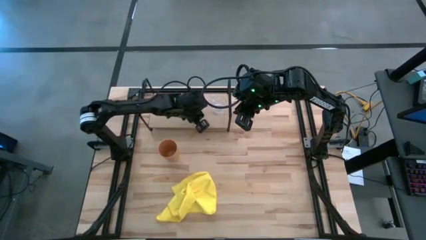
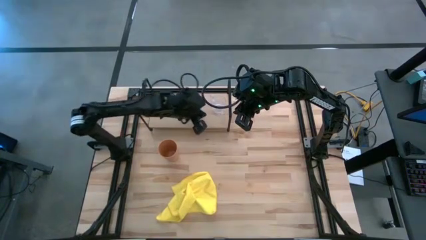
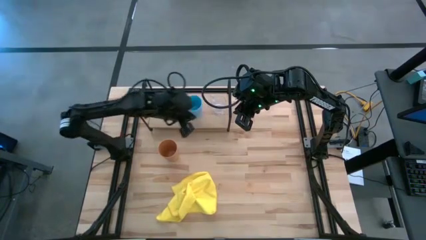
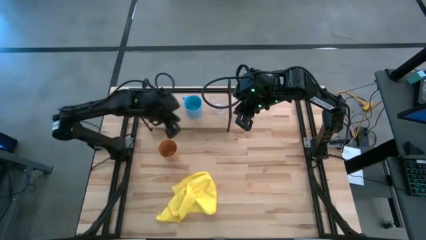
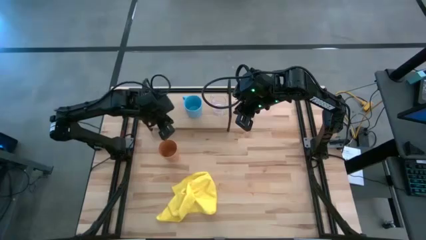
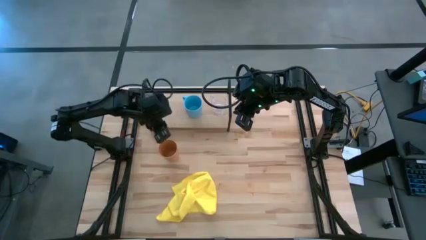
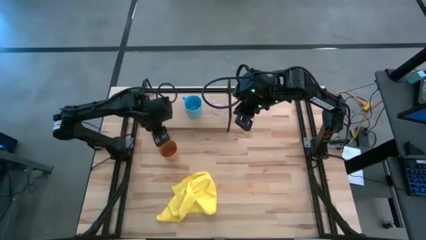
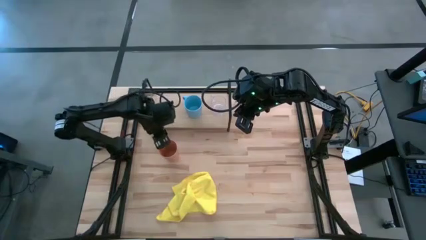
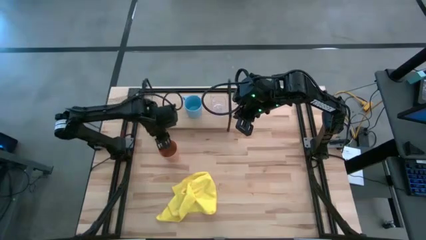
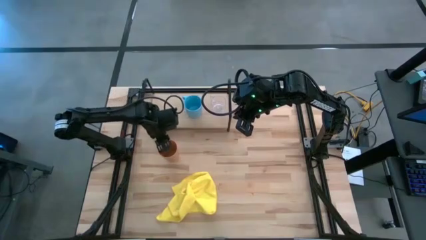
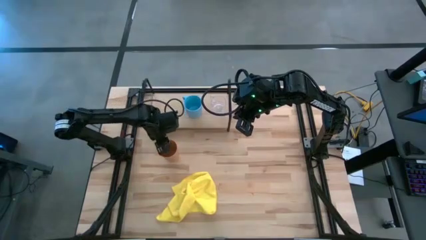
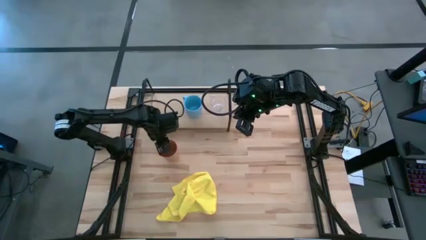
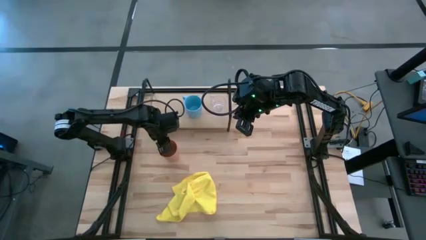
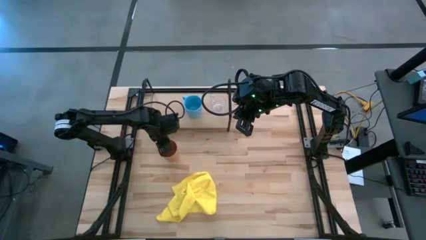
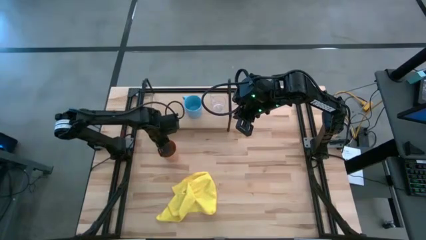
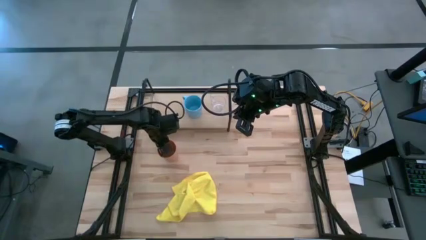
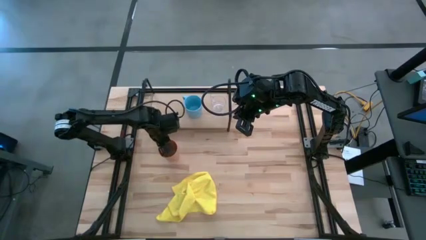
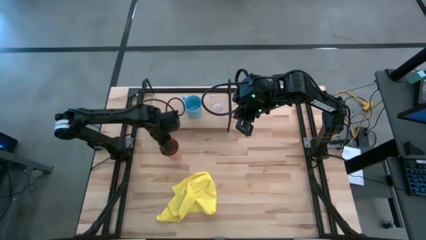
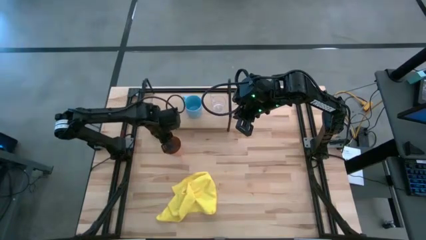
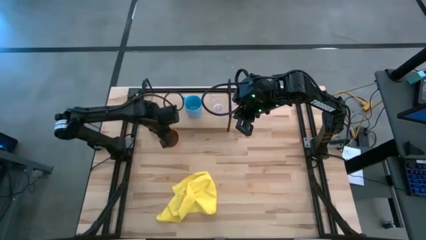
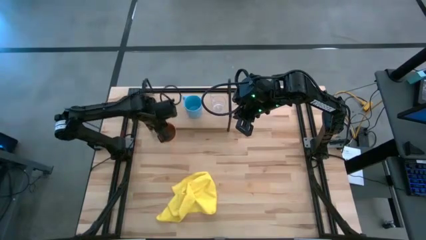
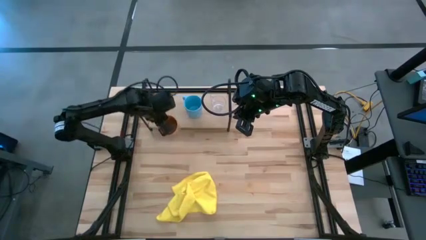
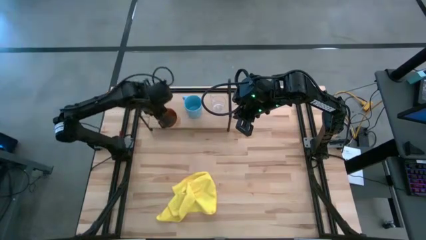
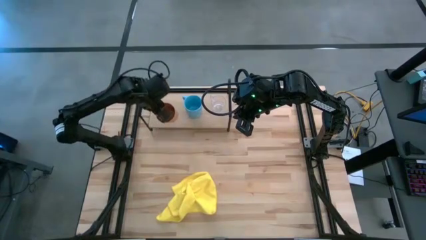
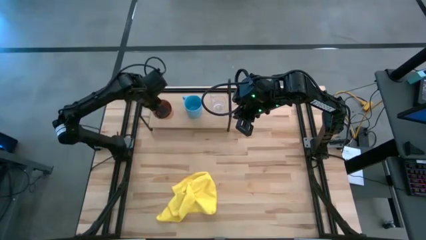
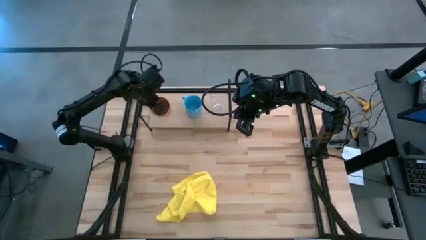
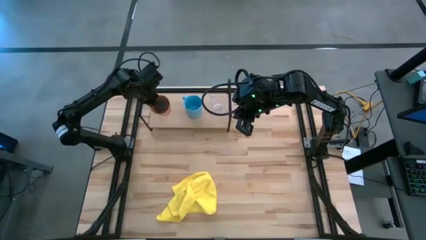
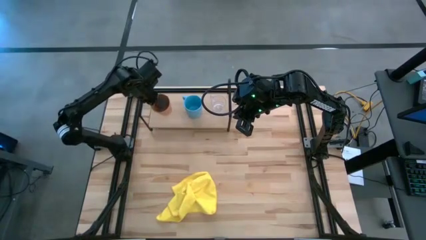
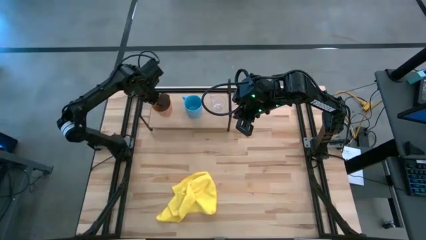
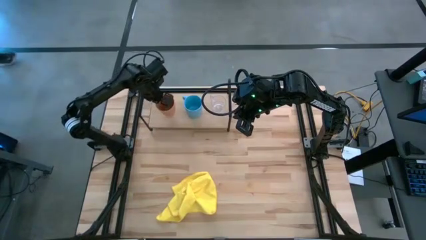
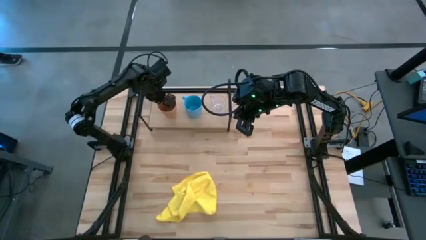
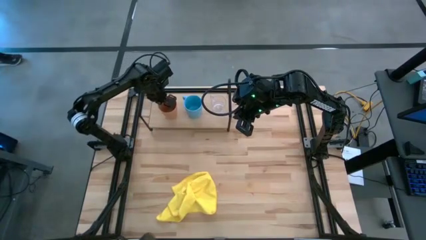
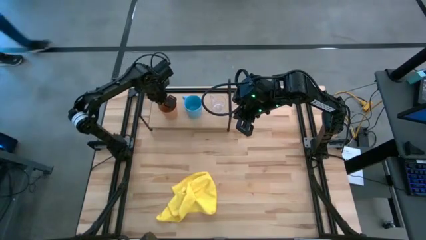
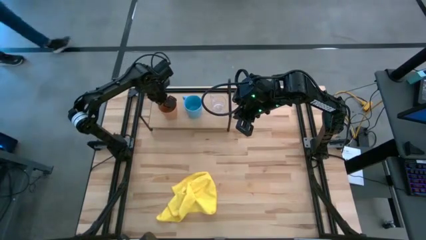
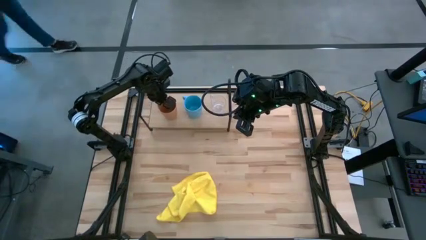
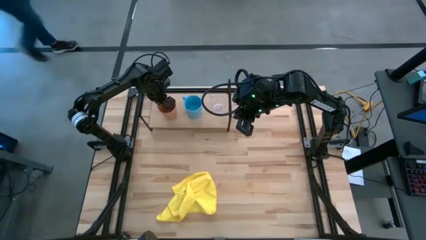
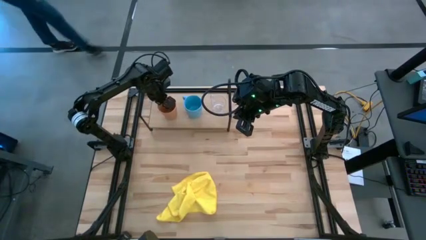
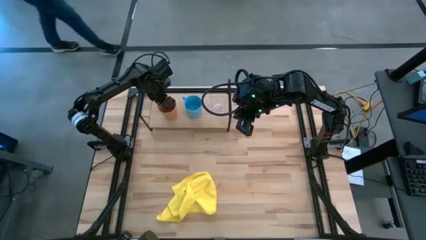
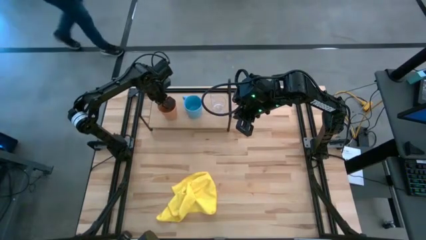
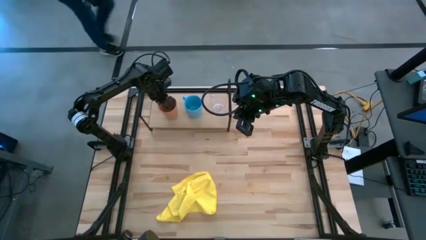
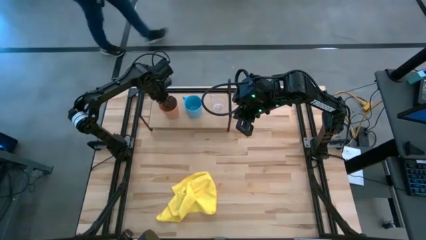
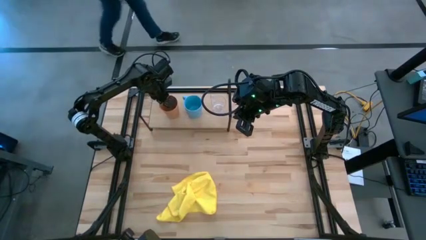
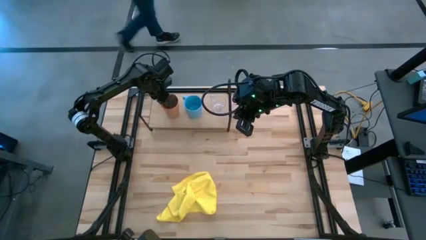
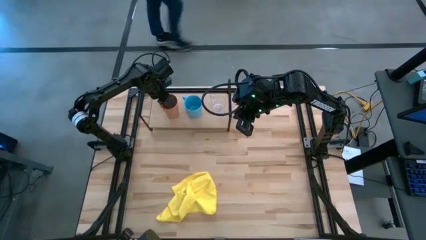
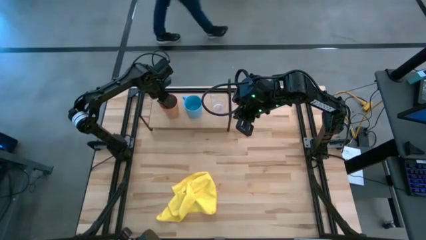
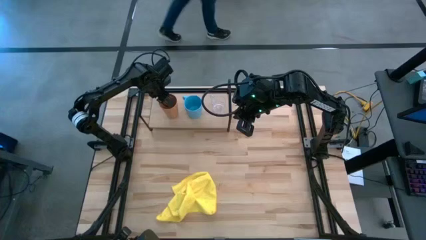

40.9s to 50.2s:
Task: Stack small to large cups/mugs on shelf
Put the orange cup on the shelf

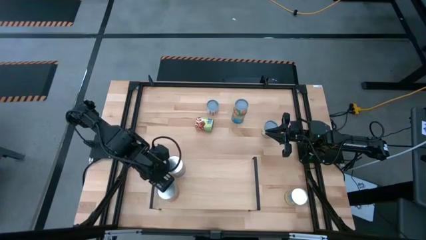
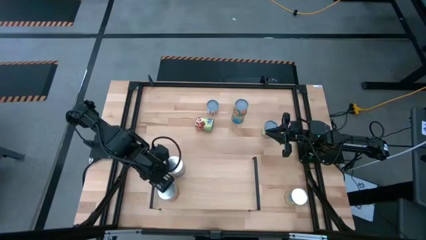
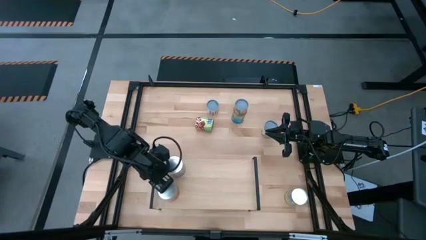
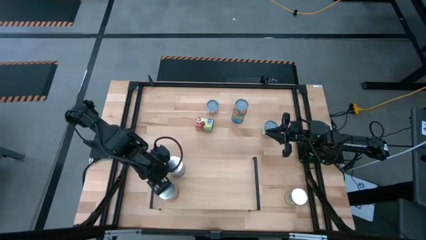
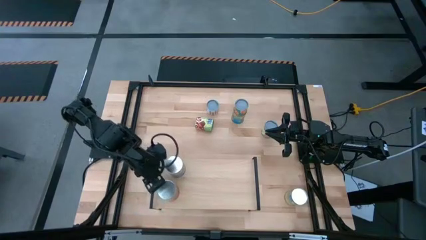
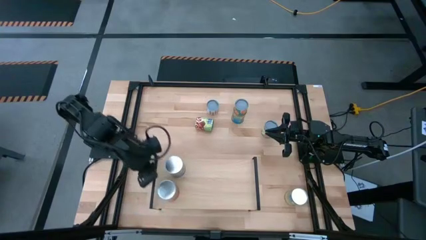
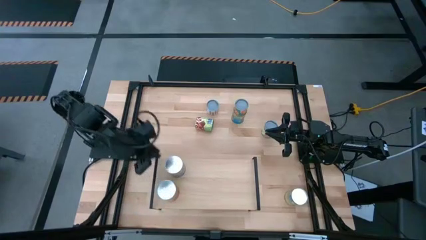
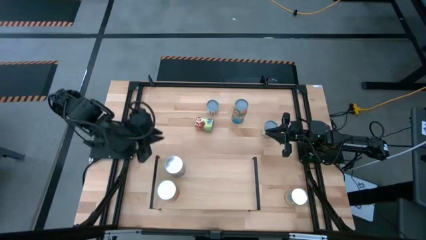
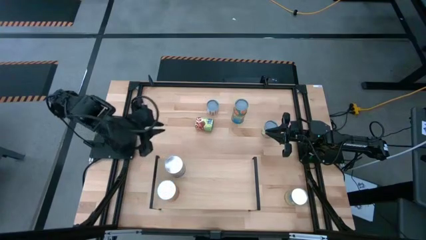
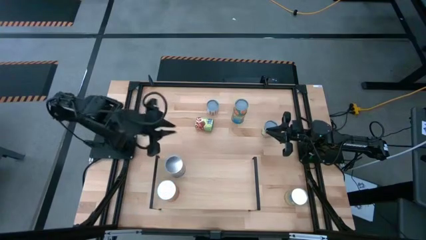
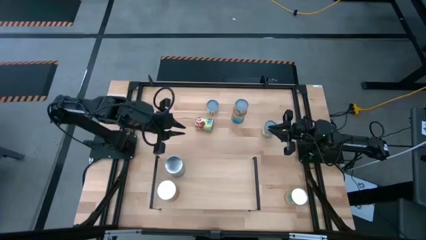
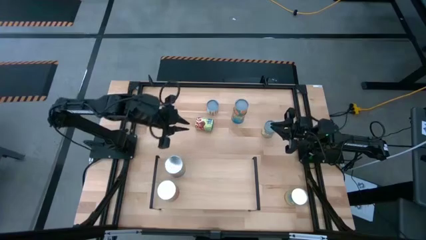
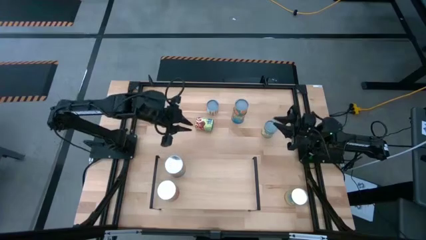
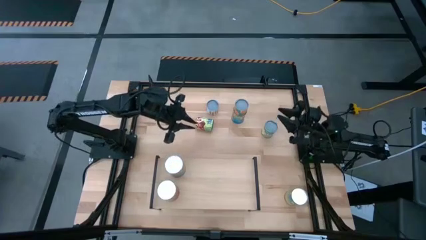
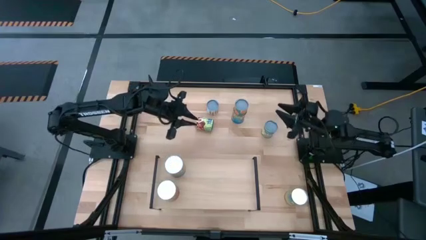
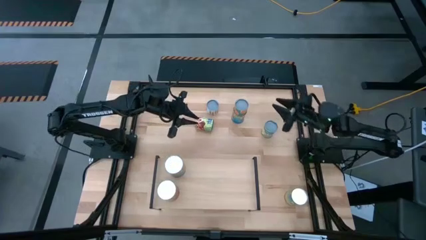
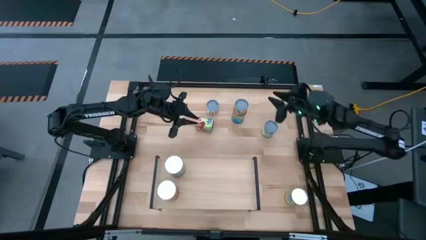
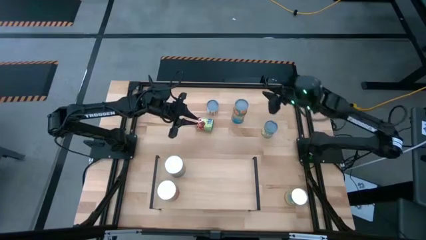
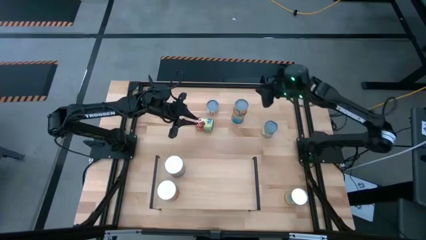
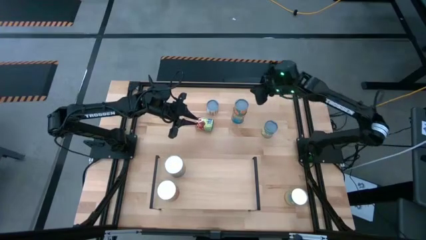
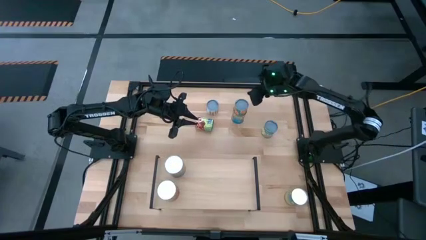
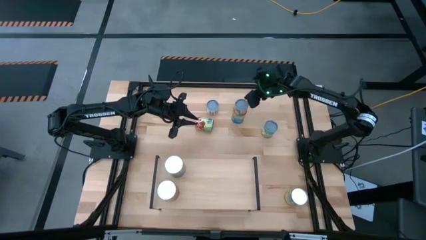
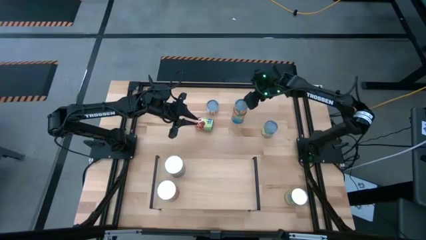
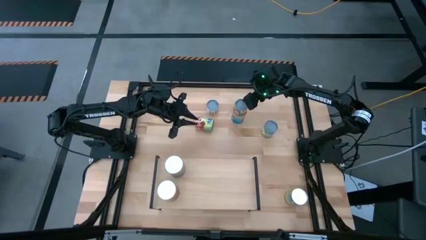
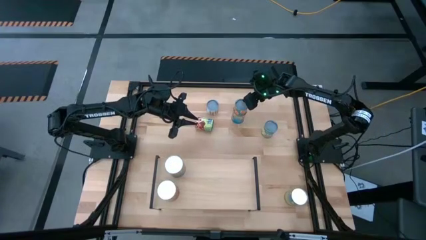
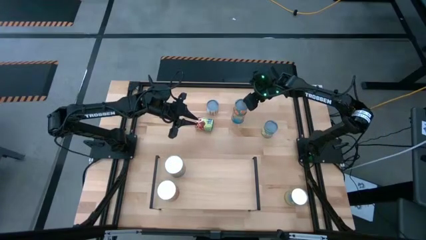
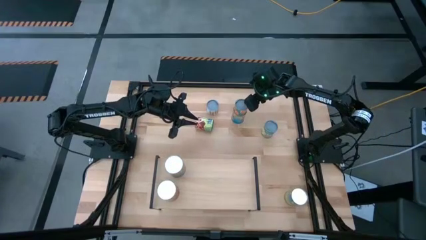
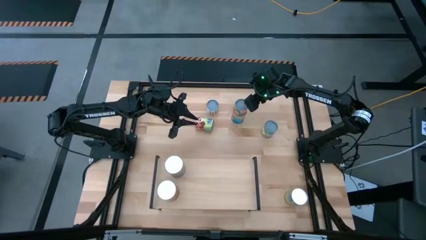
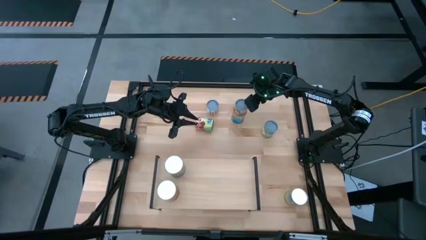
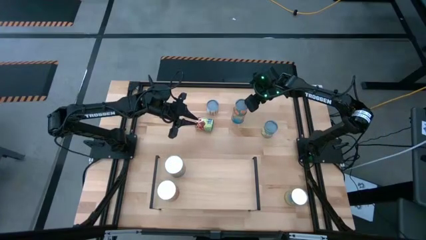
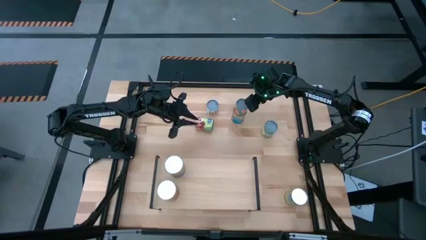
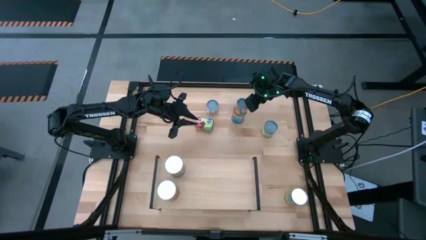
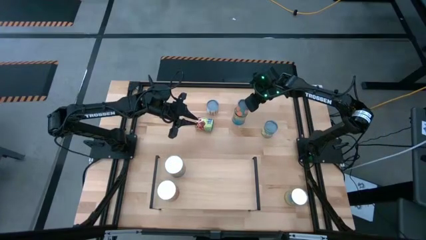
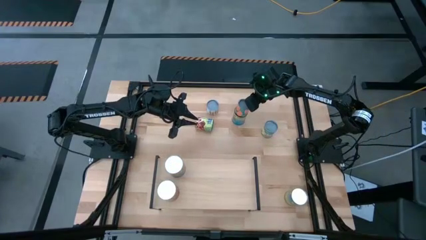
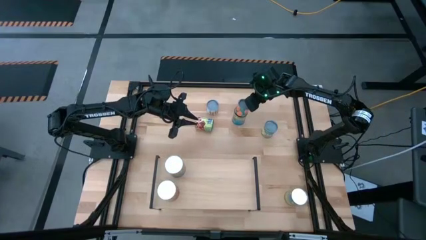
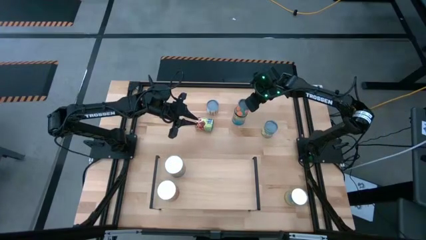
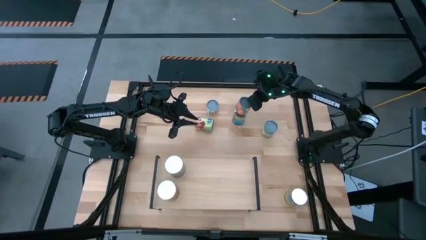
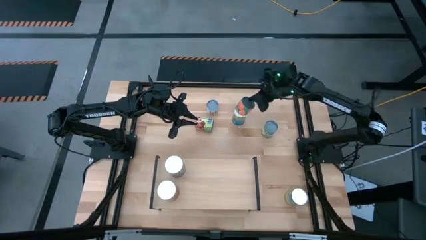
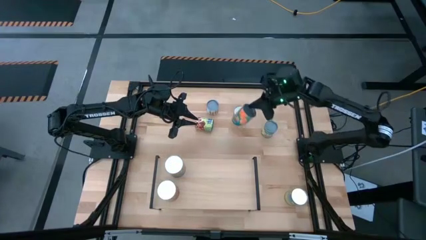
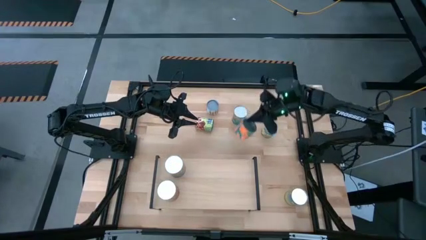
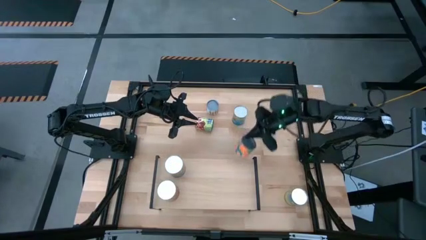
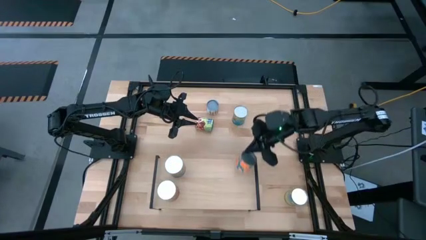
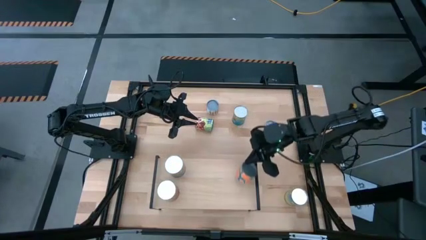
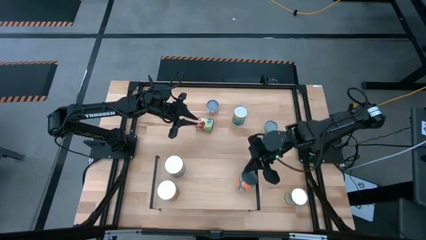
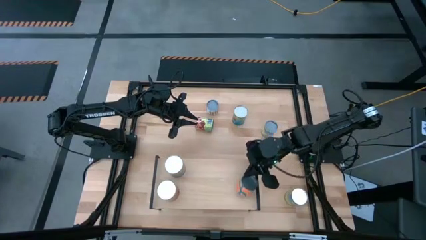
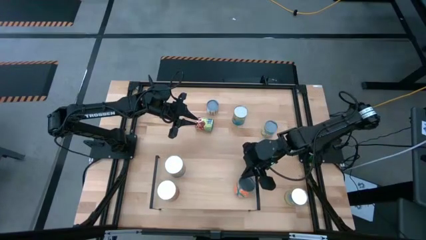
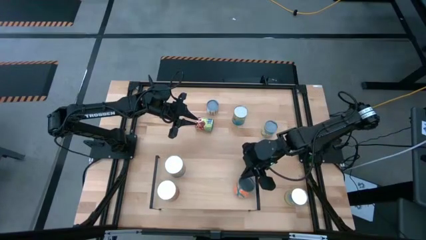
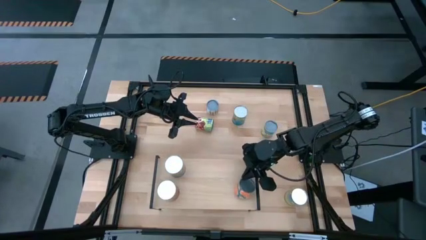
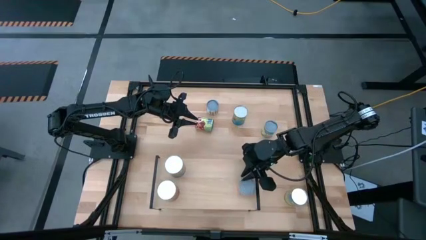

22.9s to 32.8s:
Task: Pick and place cans onto a shelf
Put the canned oranges on the shelf
